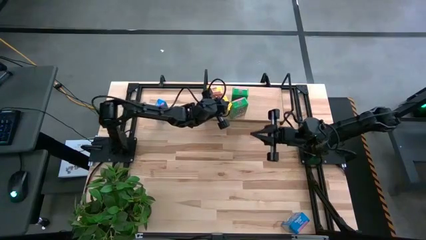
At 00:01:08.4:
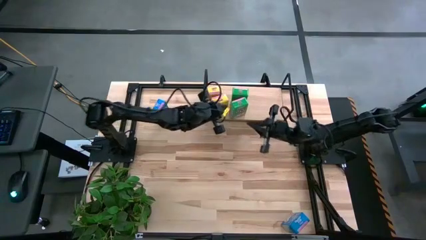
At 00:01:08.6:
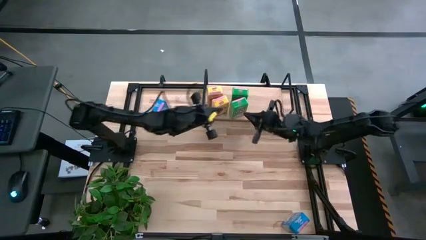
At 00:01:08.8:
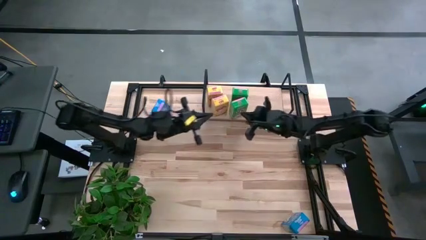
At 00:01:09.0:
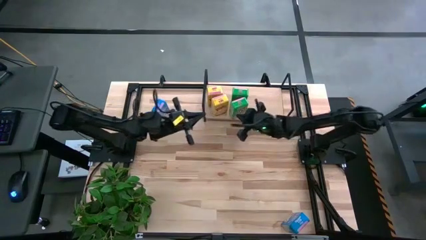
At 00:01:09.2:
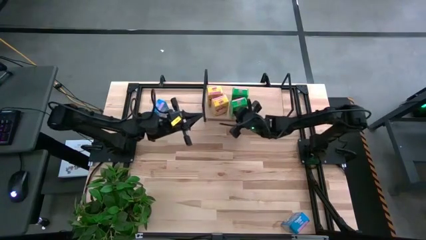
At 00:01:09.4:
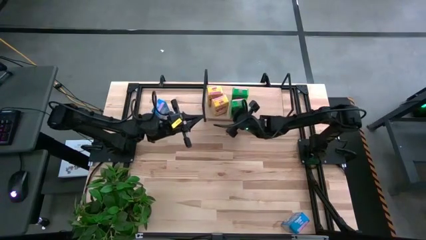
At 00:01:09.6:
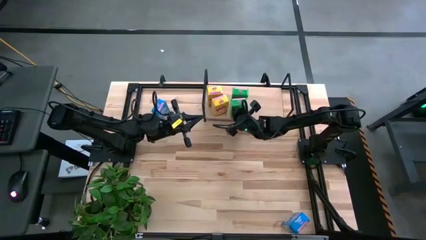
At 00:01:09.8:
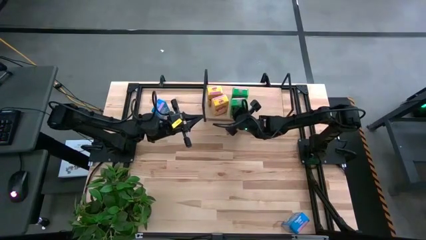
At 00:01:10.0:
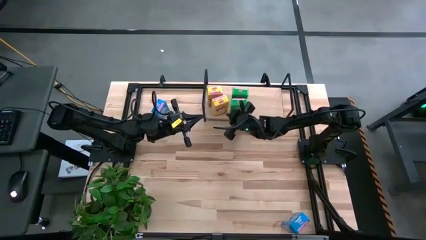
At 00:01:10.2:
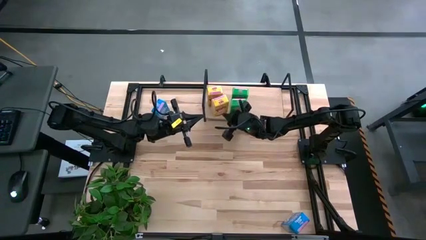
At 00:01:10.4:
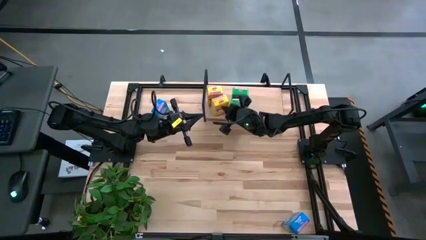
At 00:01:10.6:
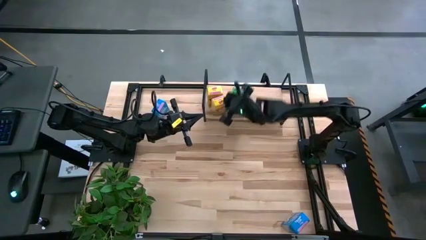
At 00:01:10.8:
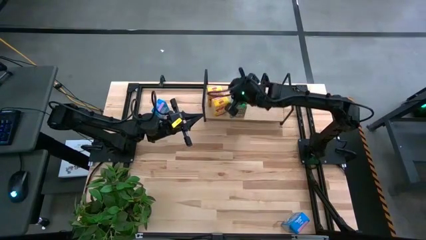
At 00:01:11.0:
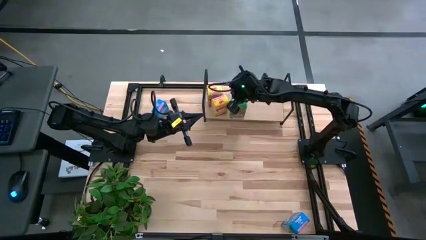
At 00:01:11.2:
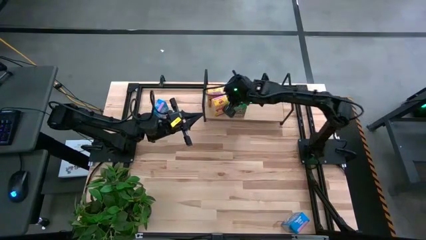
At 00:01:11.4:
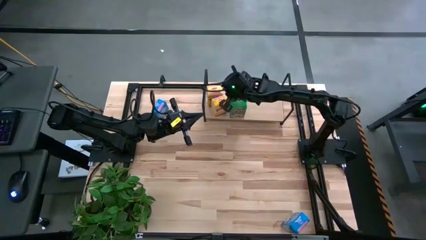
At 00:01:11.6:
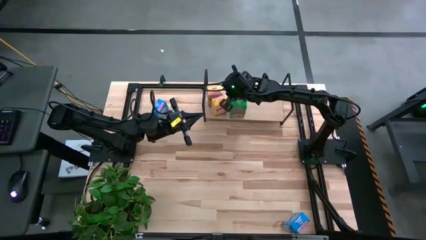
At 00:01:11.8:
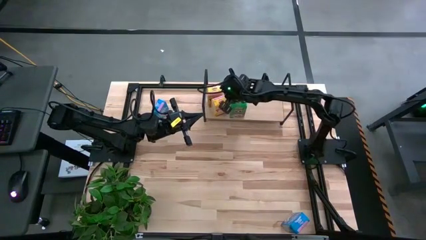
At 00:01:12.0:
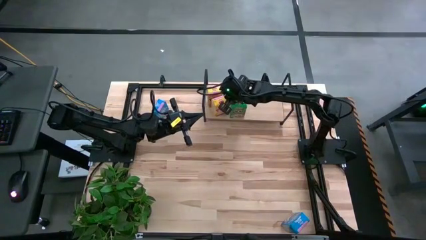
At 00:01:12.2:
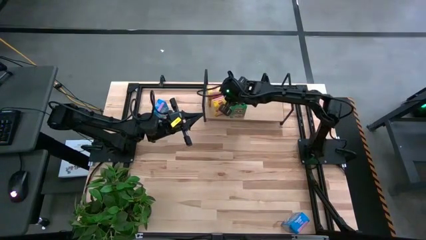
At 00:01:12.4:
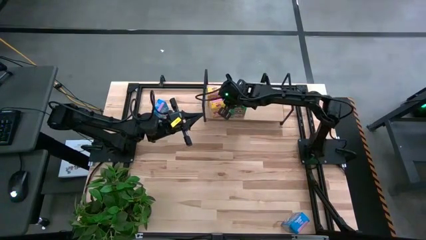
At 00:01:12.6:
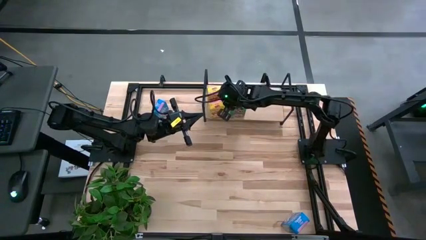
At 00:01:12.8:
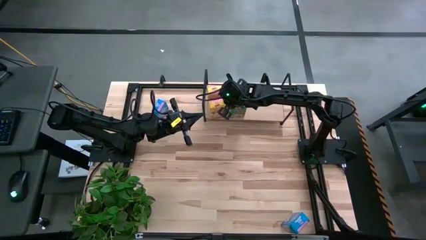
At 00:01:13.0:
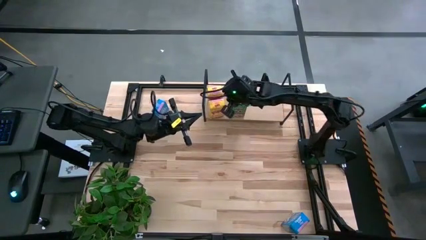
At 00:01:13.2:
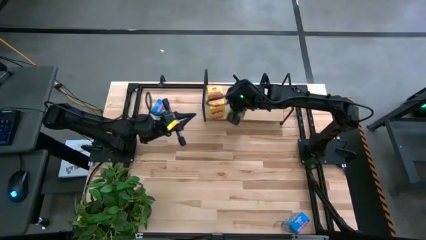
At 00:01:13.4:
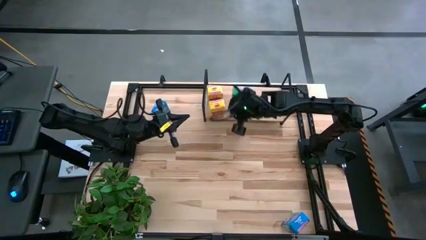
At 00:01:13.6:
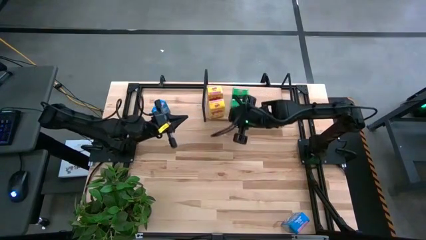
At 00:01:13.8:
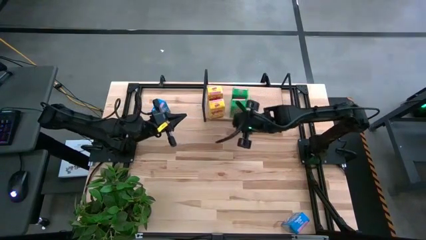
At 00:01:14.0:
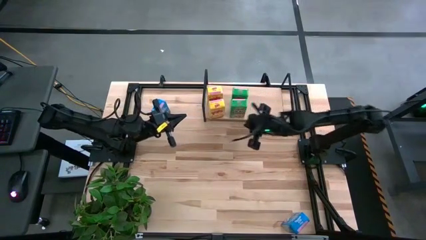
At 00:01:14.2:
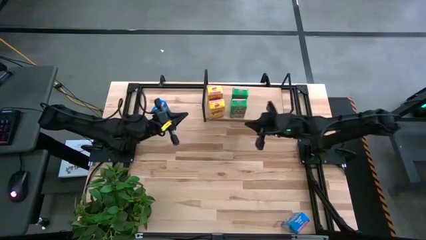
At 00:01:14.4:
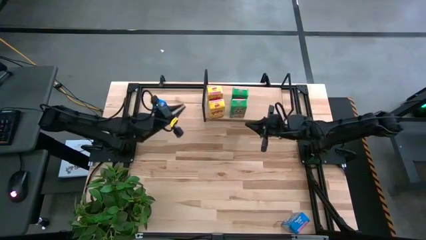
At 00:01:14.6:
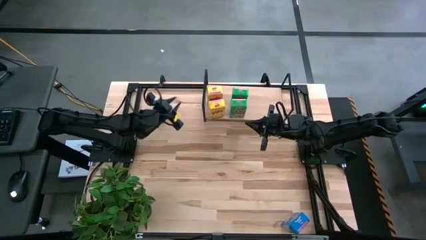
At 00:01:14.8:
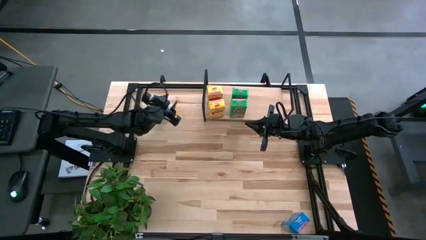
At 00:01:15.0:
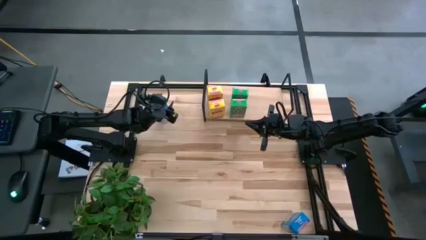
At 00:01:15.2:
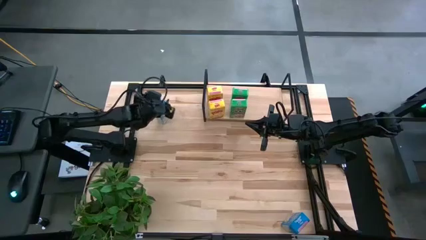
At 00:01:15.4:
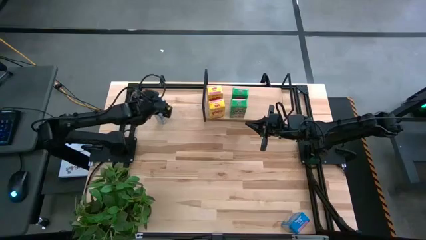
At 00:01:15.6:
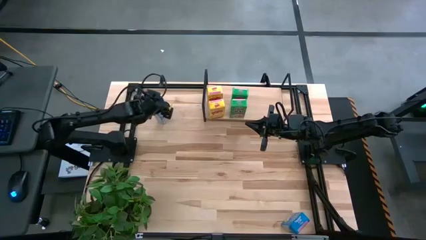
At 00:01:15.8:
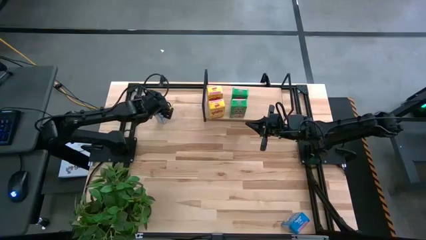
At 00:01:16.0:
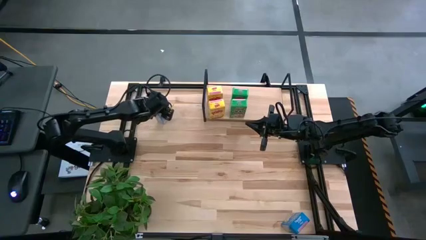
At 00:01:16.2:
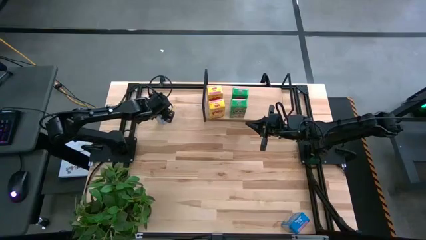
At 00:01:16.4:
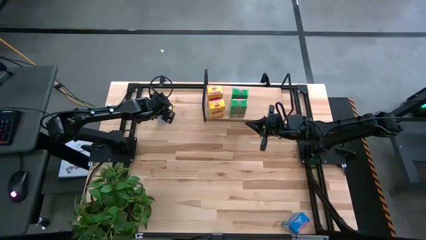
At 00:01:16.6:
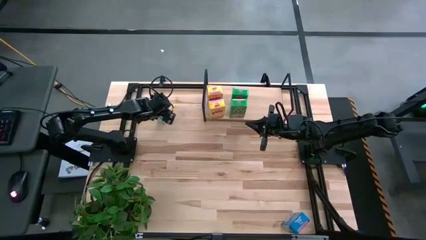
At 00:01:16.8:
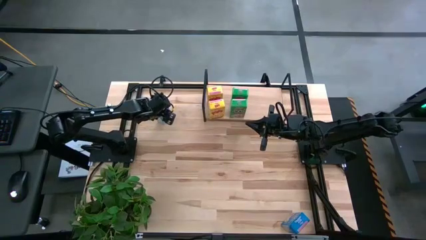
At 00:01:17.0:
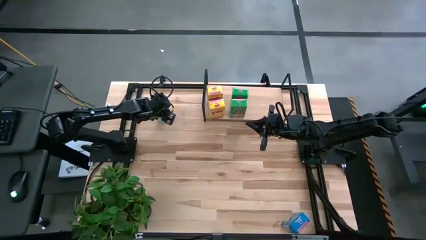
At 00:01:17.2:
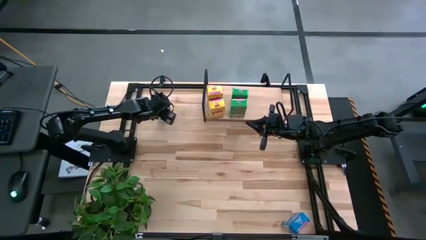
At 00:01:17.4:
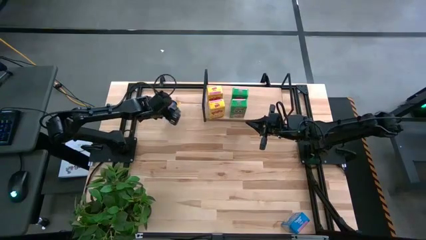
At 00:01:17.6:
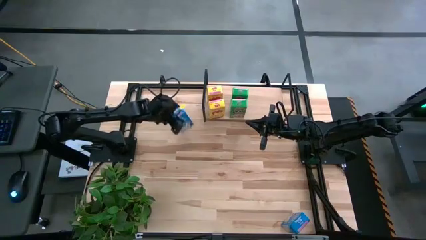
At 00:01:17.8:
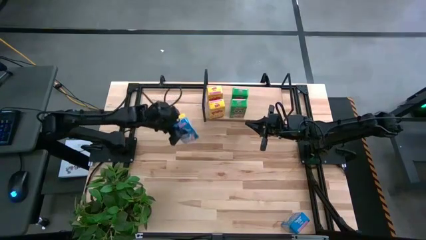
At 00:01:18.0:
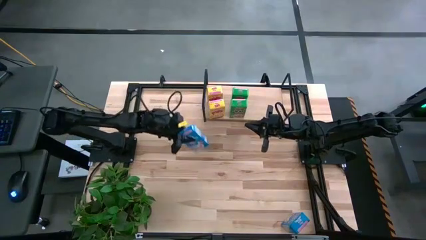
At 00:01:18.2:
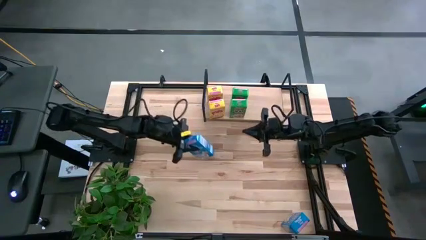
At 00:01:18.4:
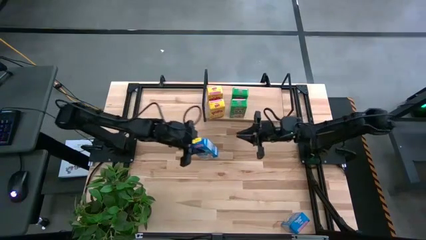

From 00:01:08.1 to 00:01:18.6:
Task: Stack cereal on shelf
Put the top blue cereal box on the shelf

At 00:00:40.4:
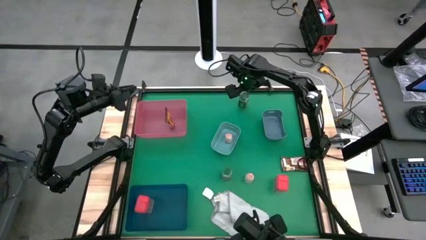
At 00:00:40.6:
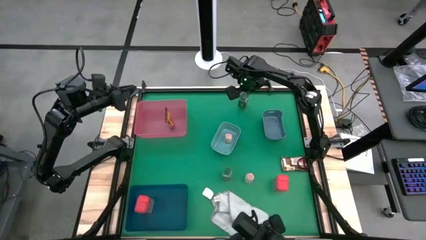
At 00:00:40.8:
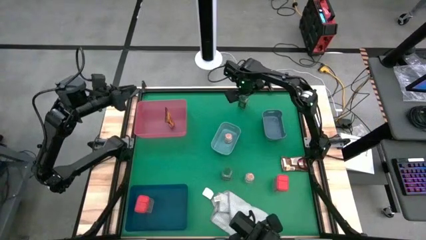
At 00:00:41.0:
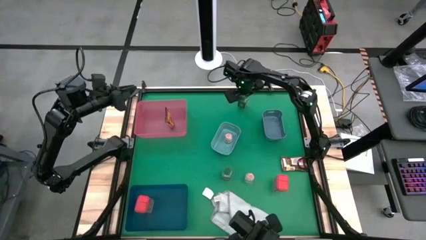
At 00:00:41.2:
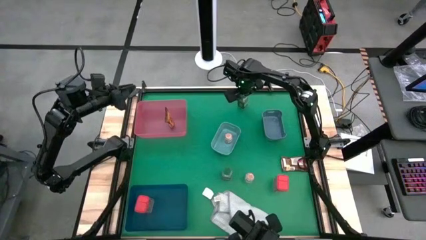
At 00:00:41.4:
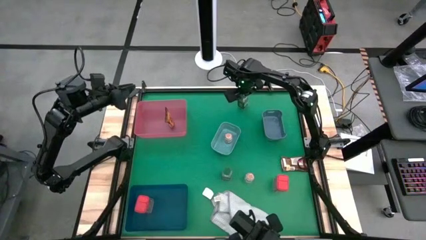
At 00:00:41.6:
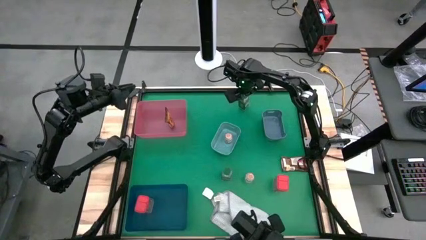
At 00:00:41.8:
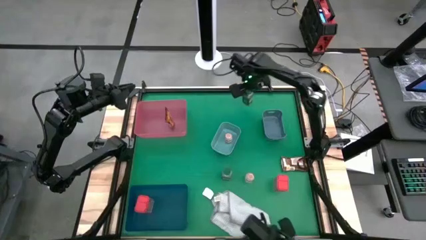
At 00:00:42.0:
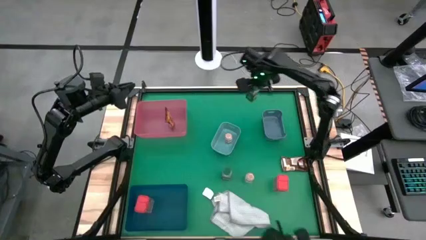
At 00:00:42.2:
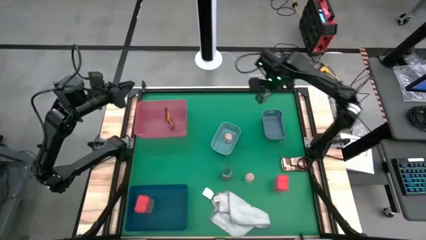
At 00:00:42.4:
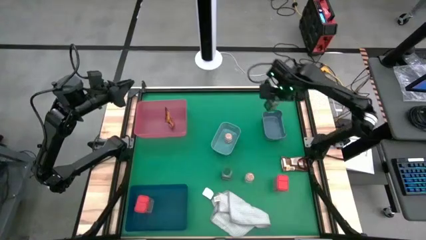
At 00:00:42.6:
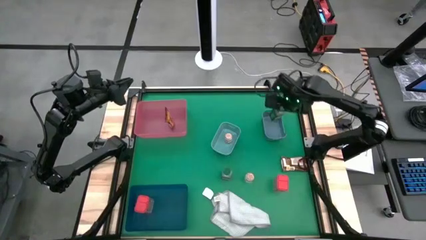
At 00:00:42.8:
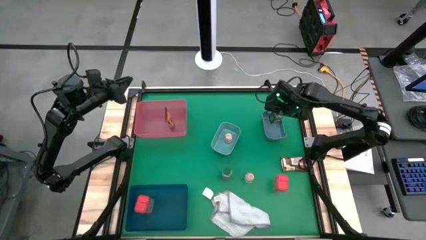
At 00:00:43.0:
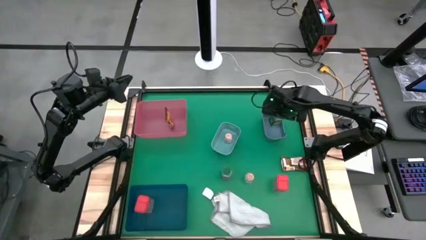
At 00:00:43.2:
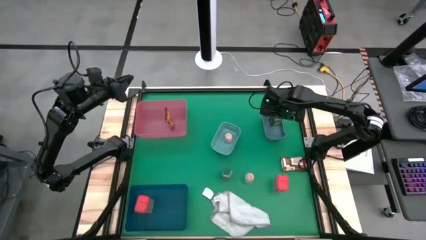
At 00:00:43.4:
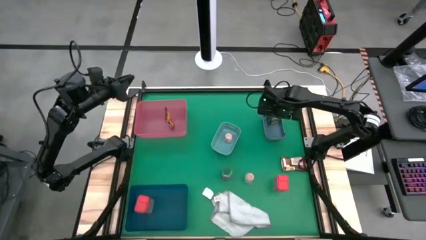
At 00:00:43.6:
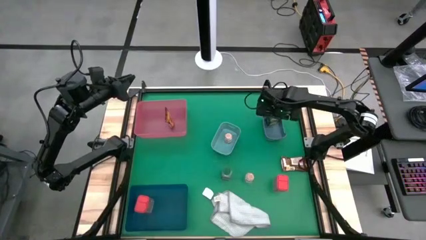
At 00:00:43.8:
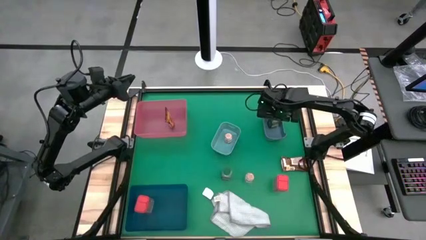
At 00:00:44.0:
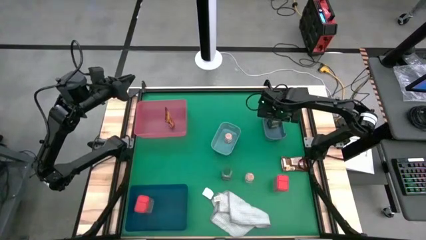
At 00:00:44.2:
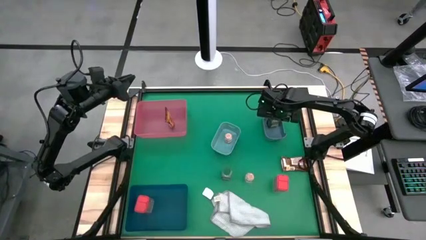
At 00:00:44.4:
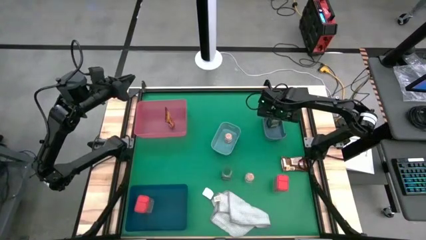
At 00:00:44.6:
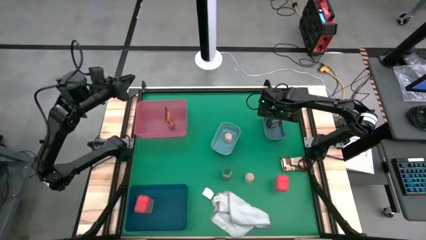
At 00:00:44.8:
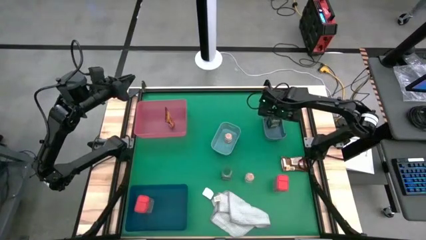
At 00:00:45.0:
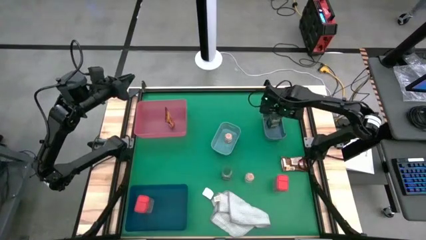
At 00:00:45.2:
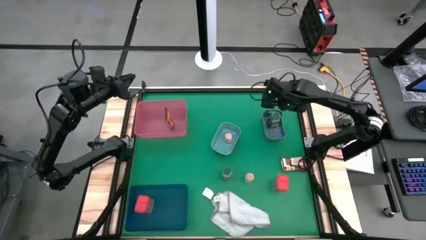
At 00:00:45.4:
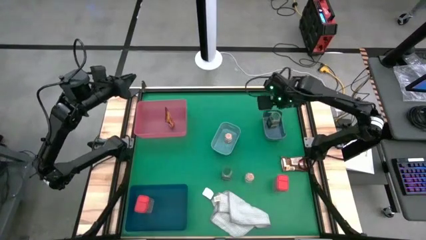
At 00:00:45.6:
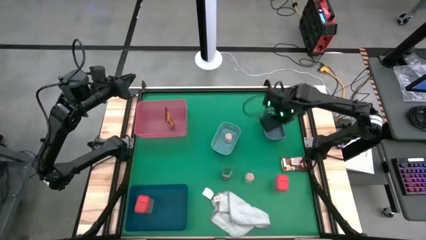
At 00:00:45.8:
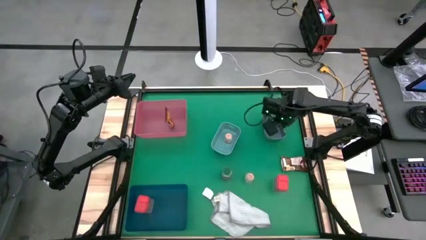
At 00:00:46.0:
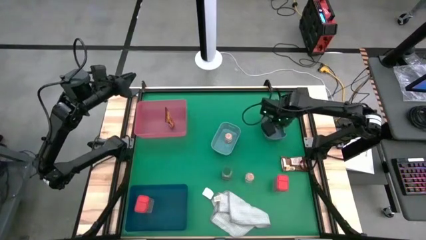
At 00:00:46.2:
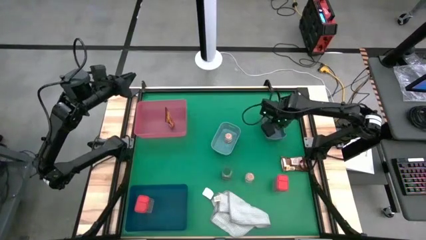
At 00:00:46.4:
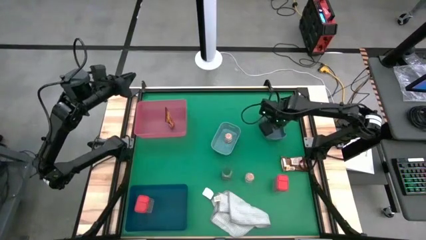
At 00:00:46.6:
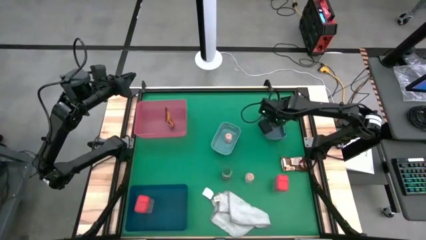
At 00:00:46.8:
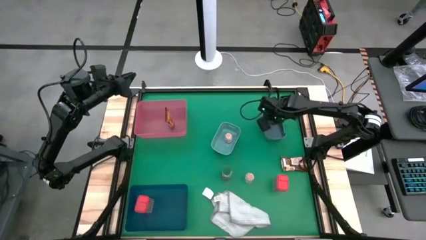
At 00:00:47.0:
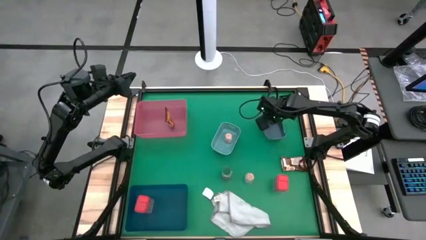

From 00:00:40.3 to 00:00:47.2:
Task: Sort spices by type
Put the top middle green seasoning bottle into the blue bin
